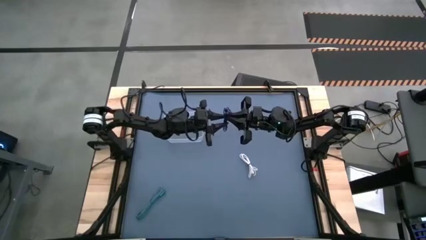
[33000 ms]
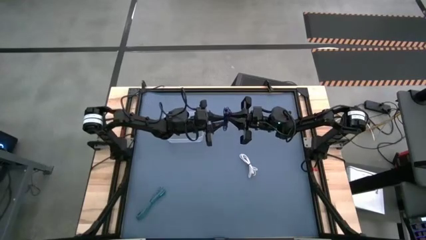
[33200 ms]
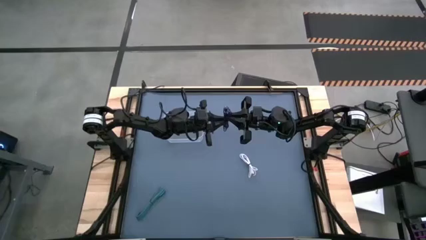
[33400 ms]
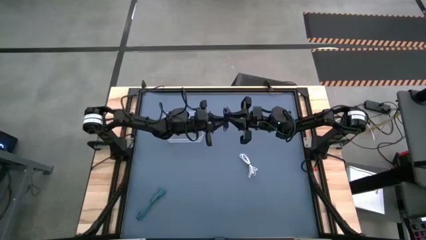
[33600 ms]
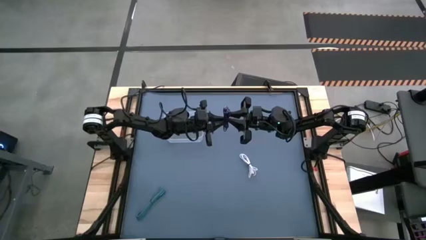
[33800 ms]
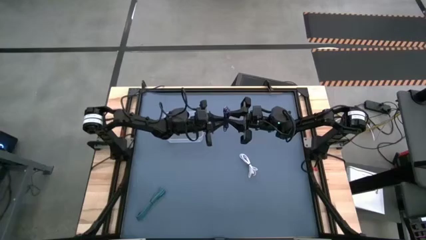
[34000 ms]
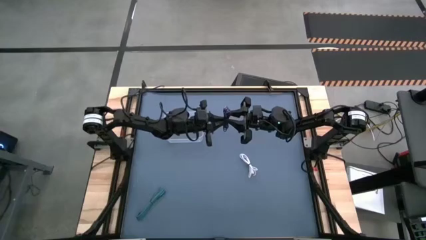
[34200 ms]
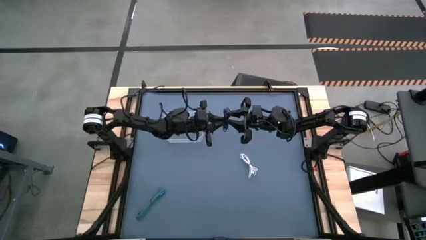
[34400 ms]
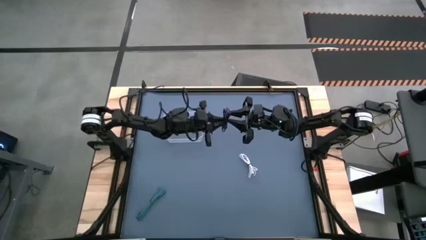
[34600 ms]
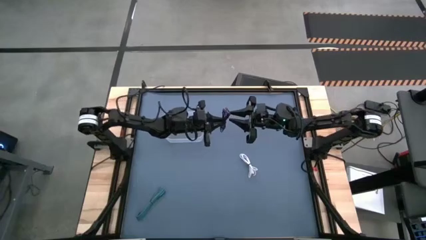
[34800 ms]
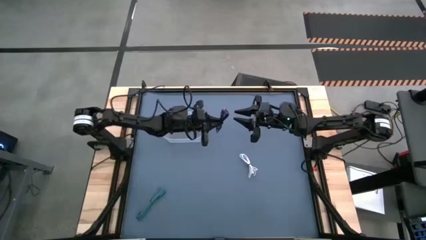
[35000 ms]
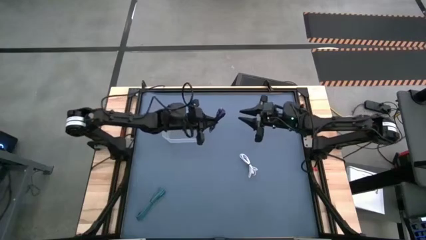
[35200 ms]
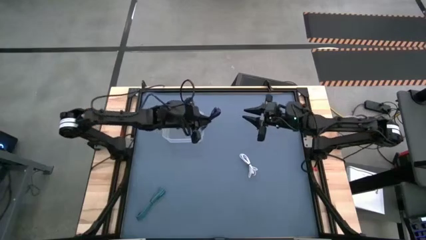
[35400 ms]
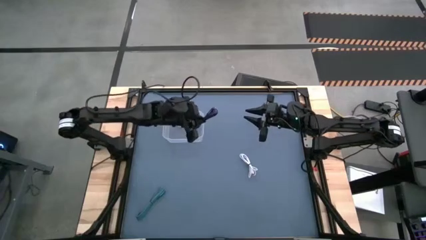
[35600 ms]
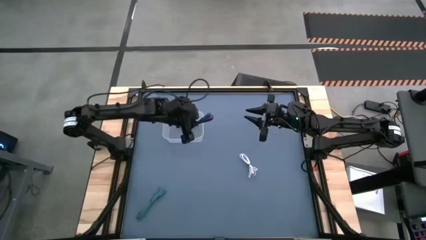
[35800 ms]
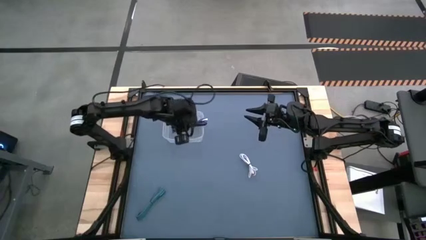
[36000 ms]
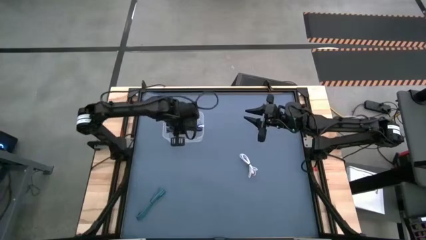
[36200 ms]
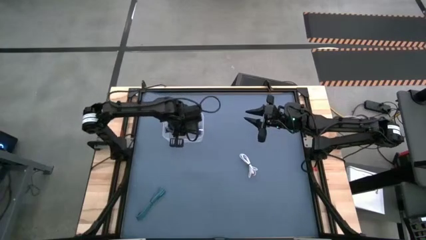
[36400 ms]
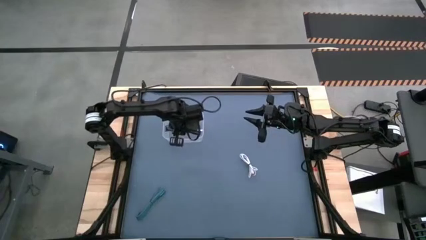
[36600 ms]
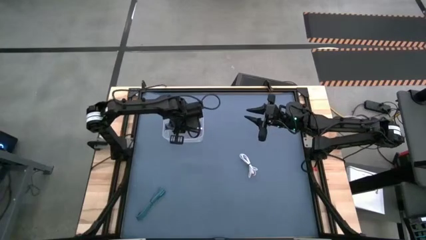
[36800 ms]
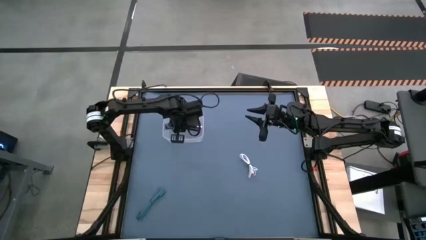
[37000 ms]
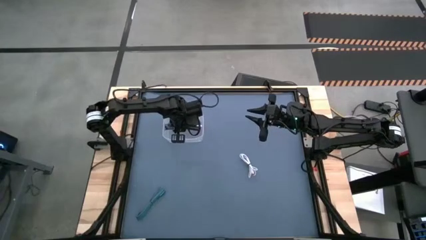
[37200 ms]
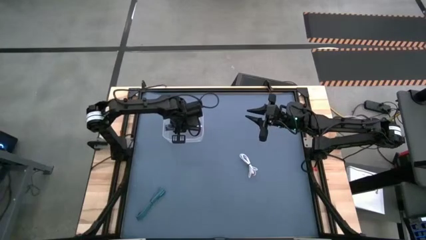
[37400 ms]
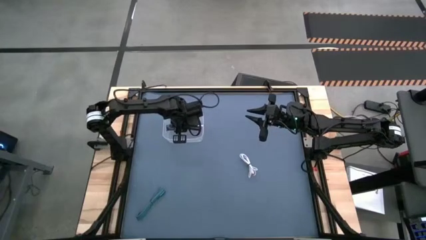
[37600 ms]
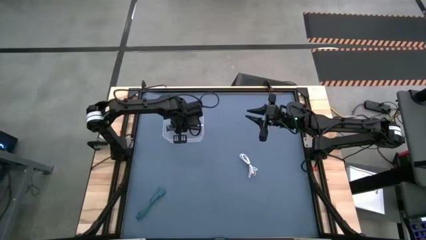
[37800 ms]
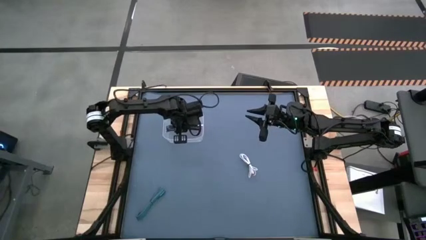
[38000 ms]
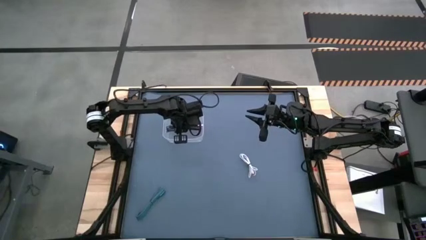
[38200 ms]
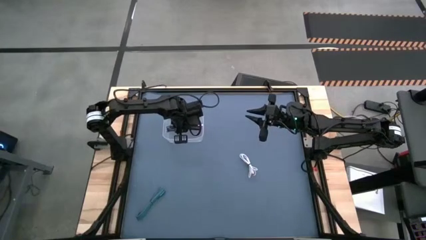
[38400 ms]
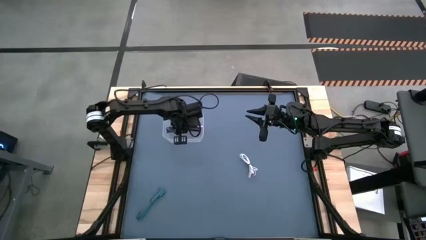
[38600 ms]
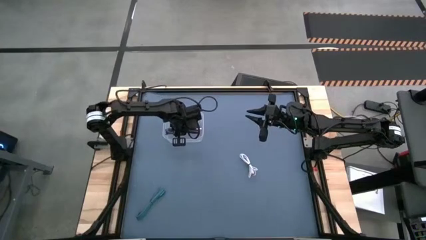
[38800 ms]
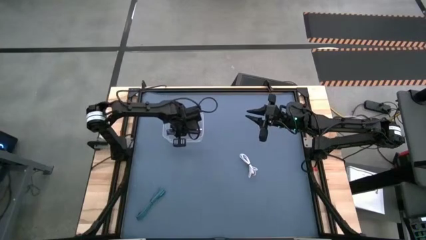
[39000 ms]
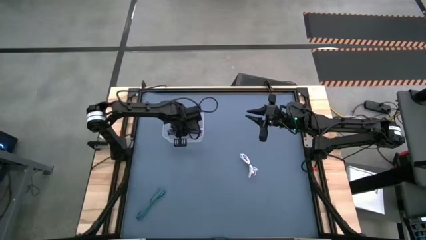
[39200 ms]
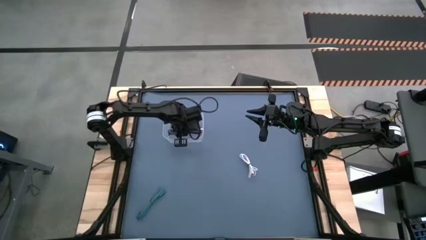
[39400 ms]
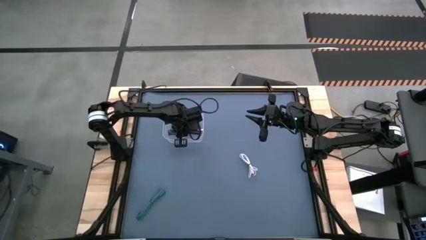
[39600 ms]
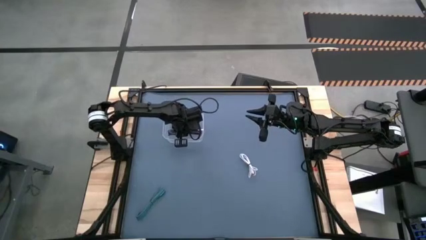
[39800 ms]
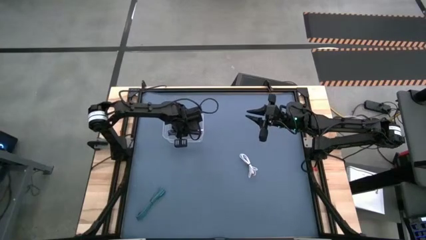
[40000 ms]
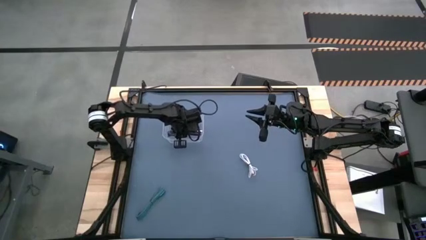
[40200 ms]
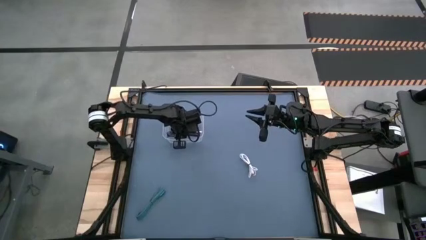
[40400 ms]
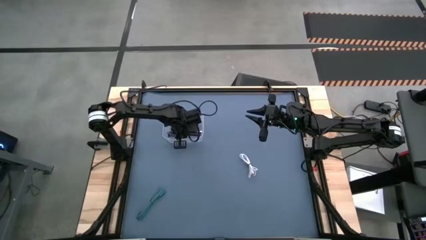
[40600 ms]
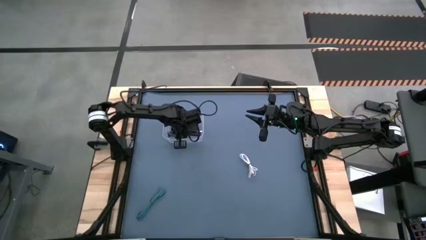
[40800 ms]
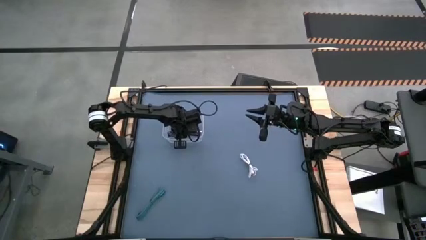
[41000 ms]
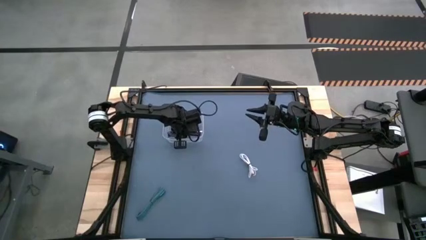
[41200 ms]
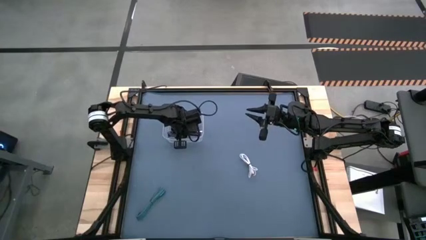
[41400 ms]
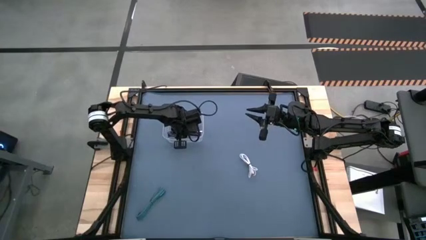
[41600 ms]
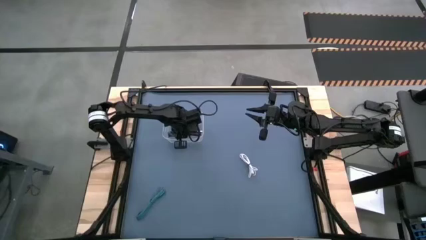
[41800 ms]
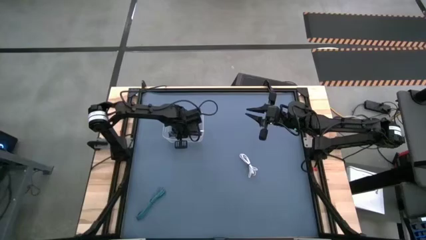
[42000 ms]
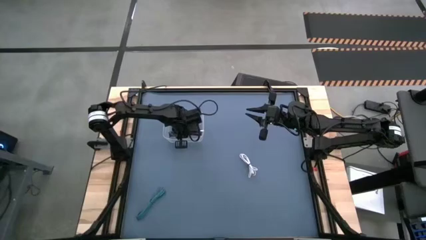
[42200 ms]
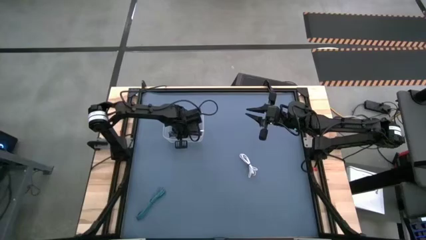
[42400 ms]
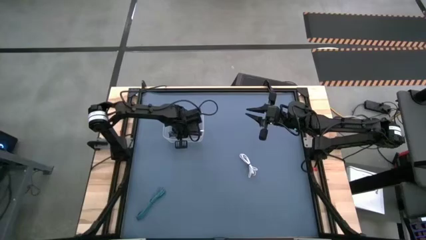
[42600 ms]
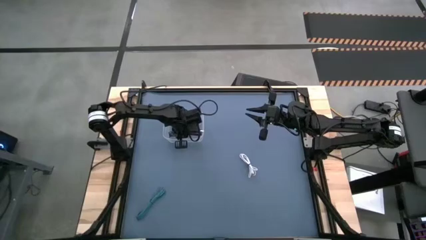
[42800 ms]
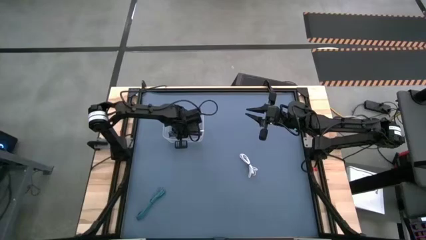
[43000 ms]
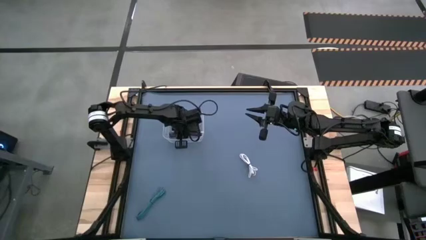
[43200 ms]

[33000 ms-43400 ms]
Task: Pick and place USB-C Cables
Put the purple charger cable into the bin

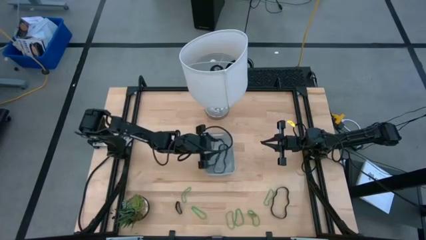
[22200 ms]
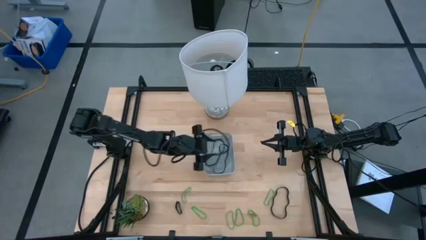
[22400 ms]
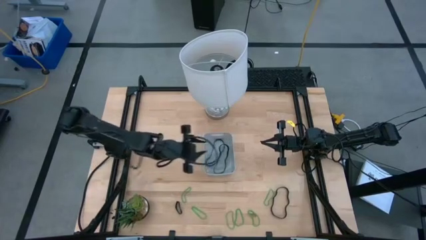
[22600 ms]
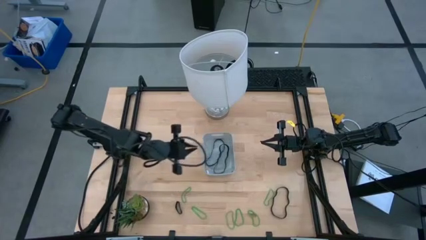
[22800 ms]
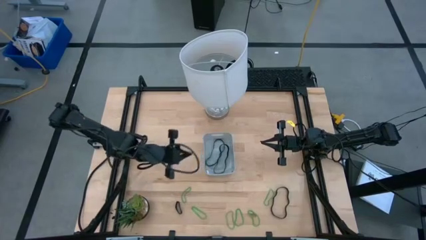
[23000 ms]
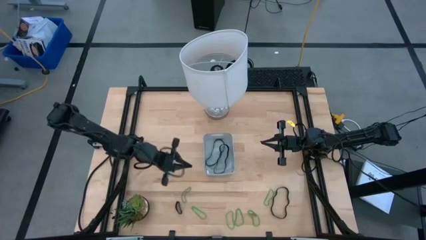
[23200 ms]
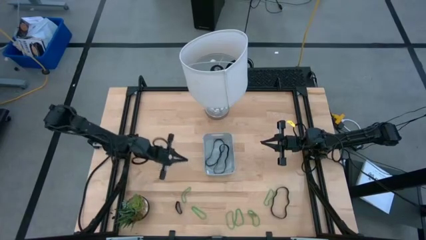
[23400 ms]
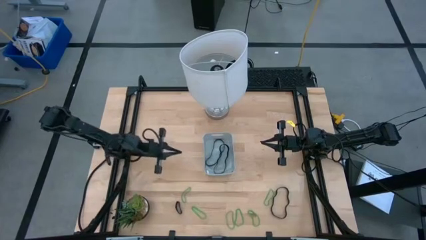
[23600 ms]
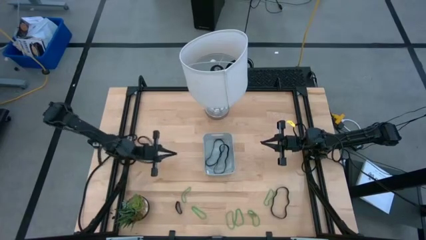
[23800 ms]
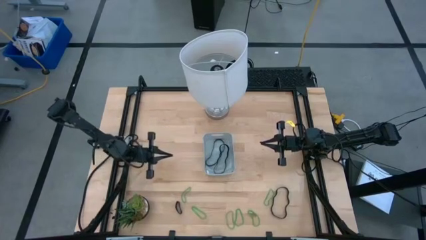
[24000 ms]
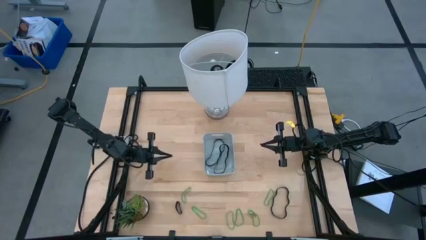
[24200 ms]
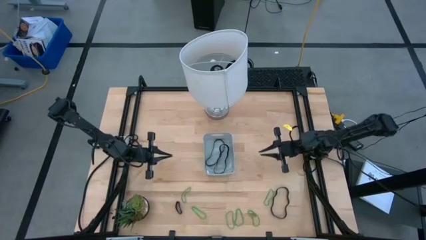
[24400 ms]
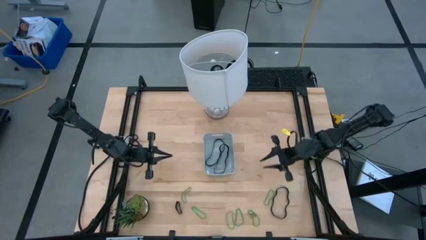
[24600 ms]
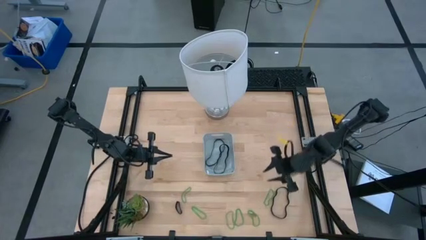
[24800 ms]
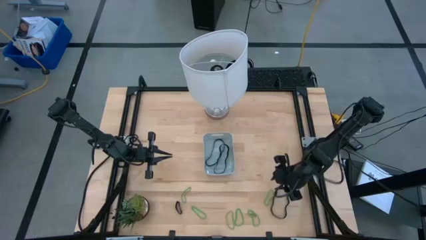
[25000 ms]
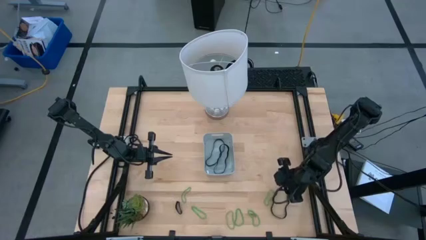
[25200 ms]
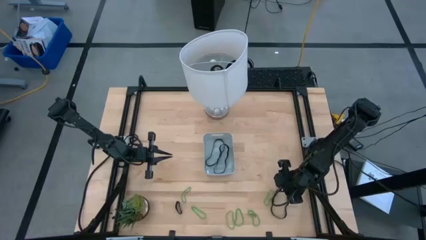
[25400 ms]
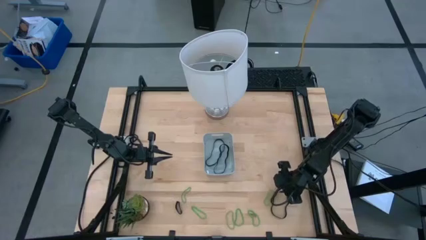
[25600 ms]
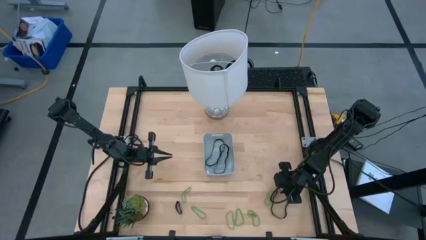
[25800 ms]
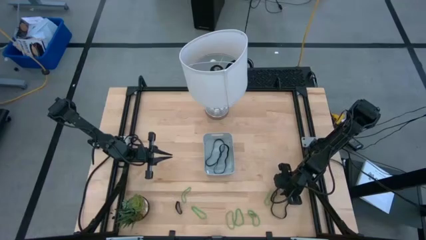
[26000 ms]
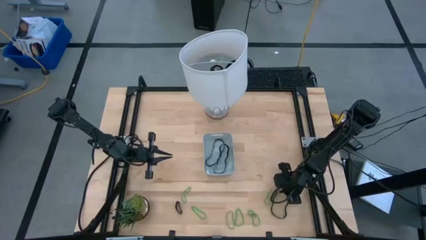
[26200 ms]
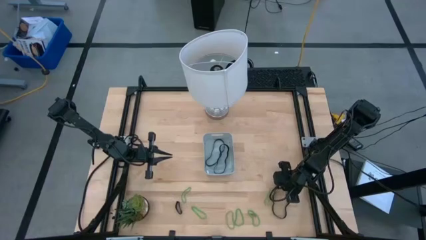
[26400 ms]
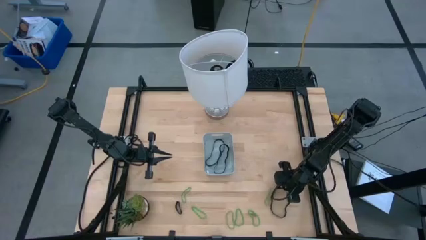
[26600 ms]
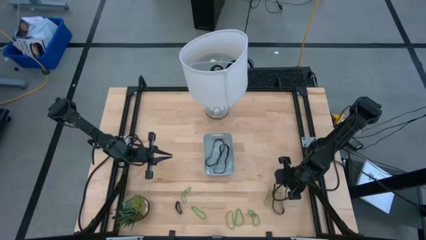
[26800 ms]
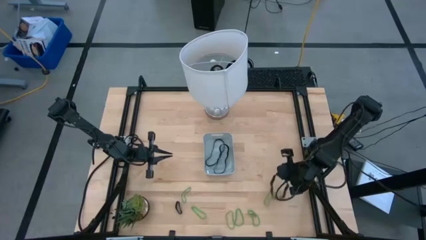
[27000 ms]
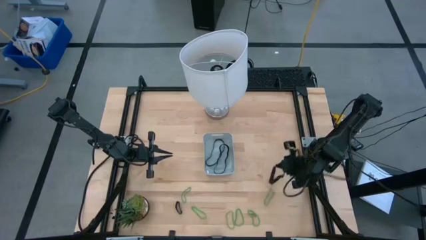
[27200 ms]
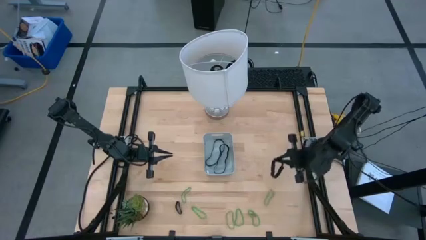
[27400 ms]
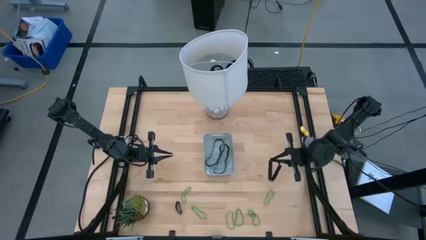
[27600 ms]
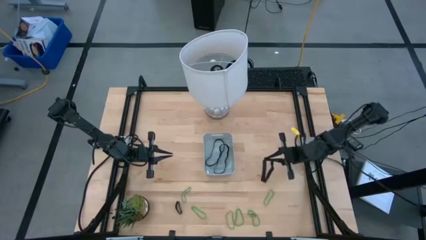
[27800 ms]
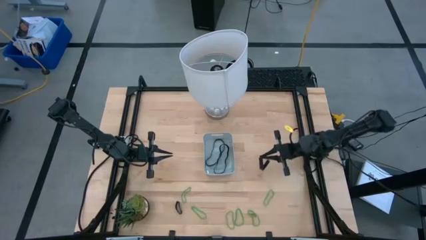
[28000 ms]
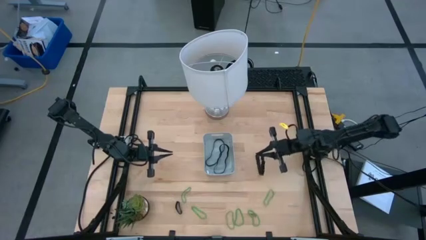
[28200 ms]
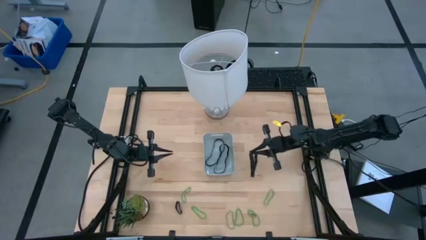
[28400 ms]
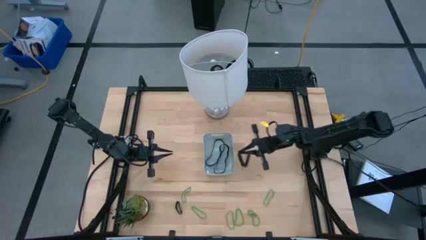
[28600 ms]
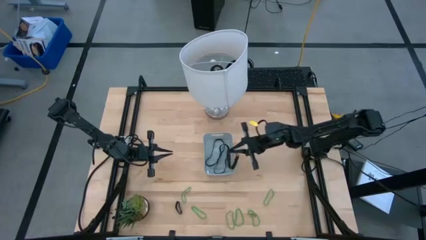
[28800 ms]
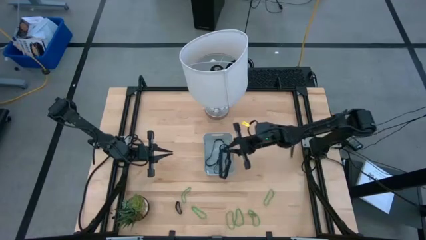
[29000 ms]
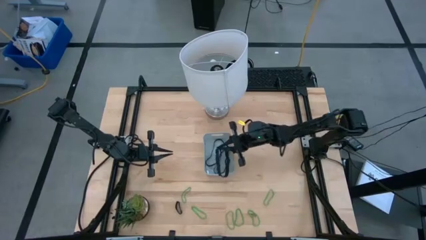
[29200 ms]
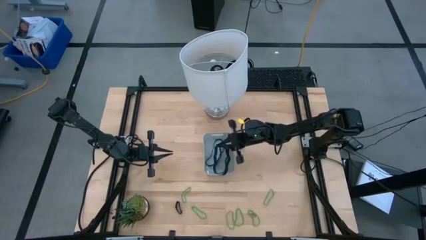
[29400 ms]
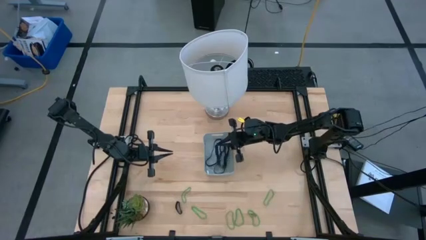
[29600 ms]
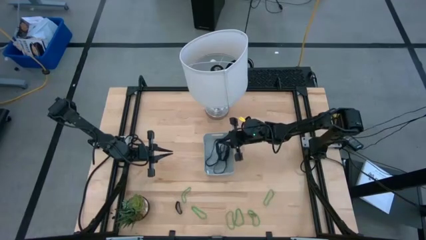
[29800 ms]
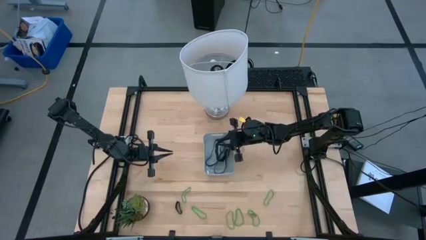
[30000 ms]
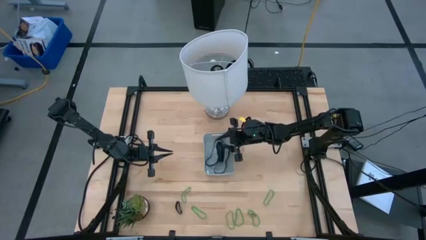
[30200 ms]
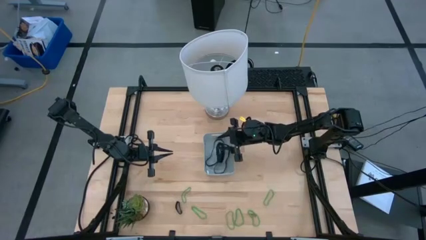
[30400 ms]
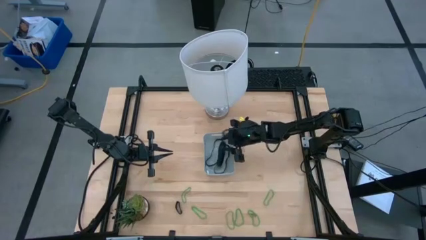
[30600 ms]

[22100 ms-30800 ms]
Task: Pick and place rubber bands into bin
Put the black rubber band into the gray bin
